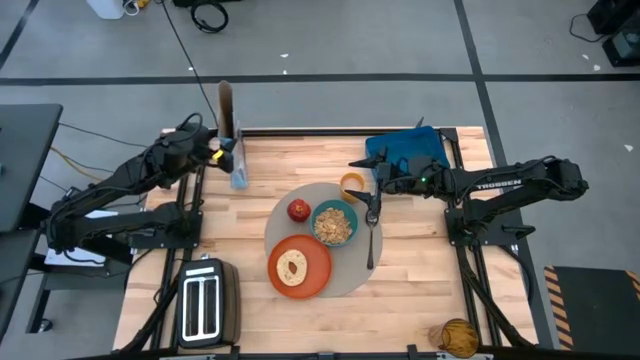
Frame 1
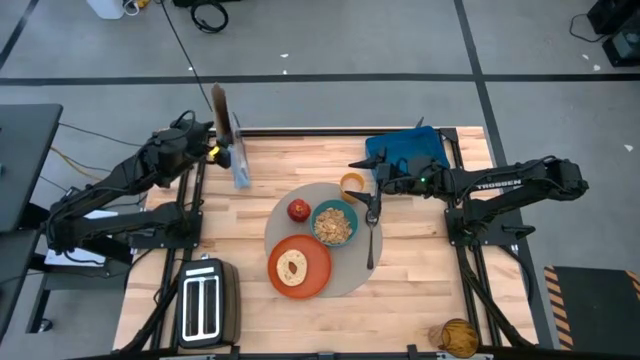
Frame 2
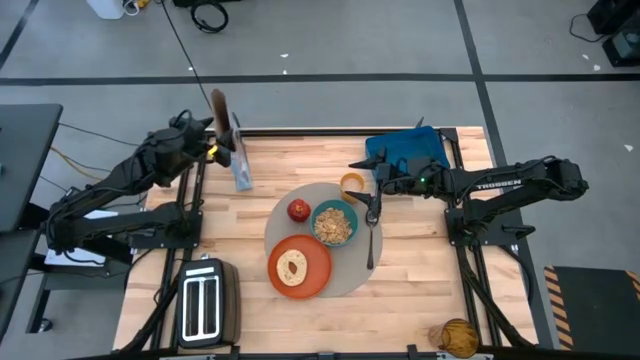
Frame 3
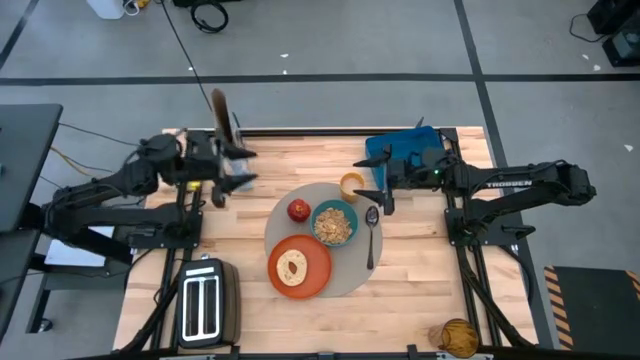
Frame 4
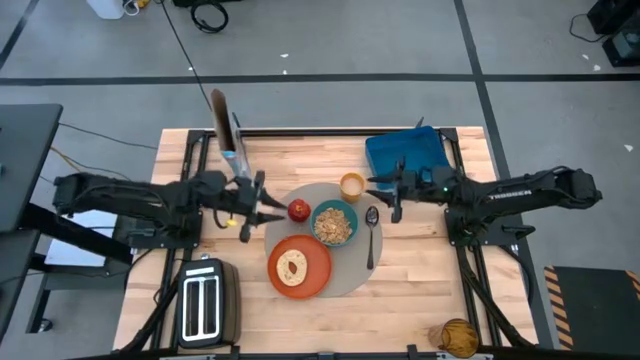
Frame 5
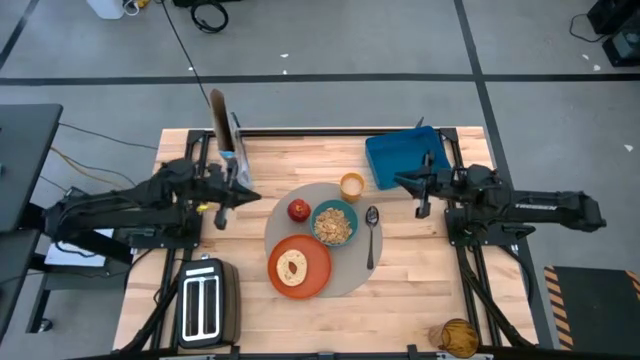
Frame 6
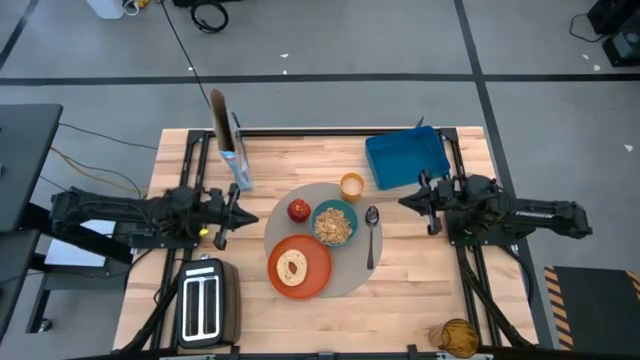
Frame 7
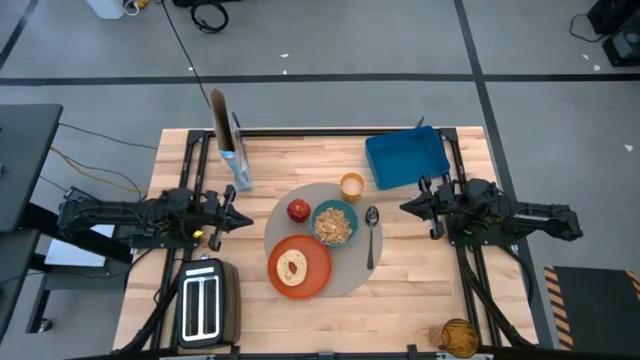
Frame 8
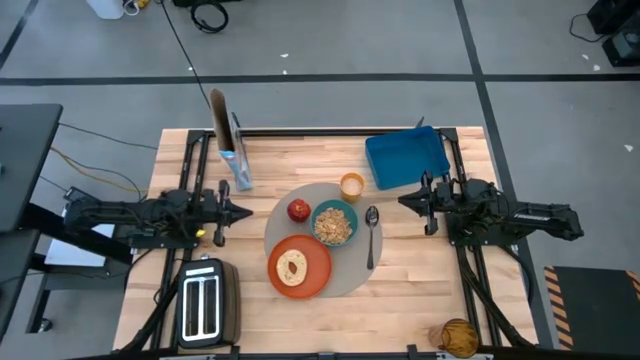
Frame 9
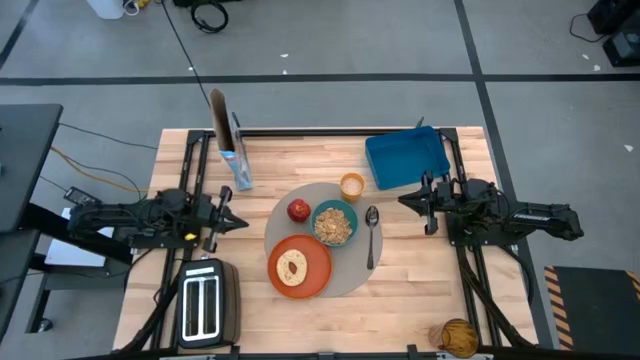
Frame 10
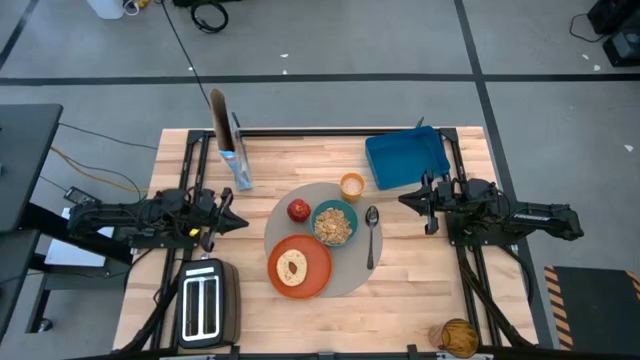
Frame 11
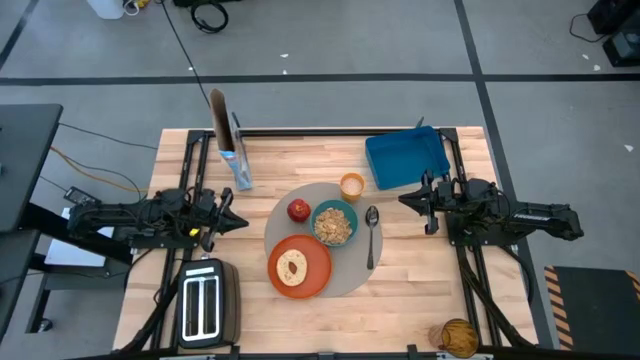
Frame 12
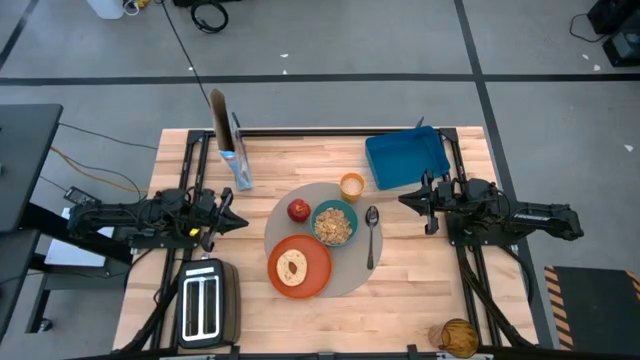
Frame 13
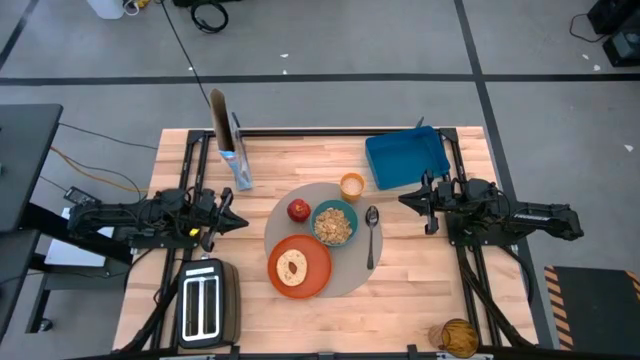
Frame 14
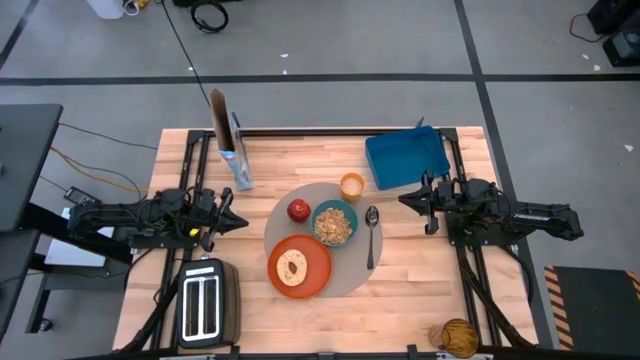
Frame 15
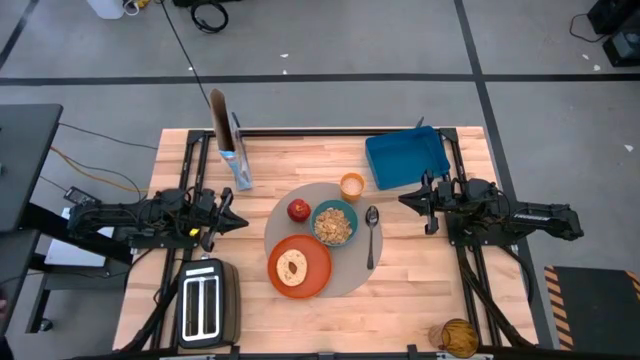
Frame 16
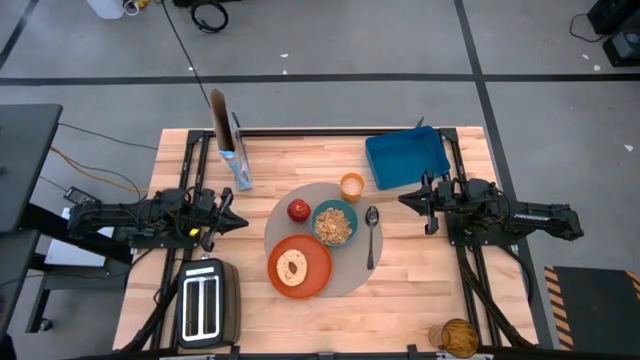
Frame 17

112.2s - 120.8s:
Task: Arrange a breakfast setting
Return to Home Position

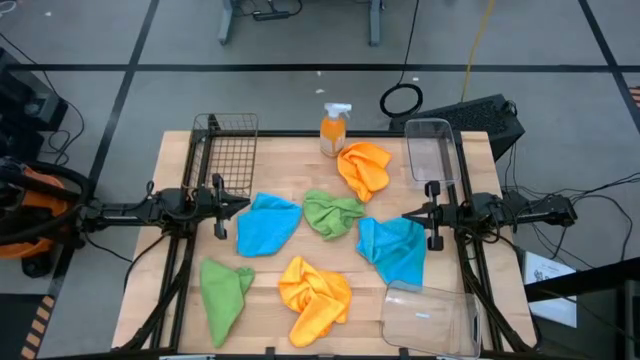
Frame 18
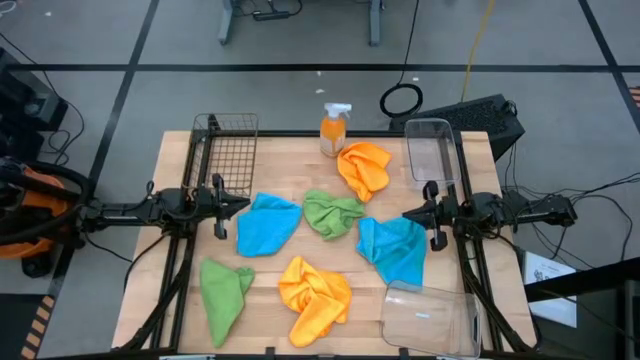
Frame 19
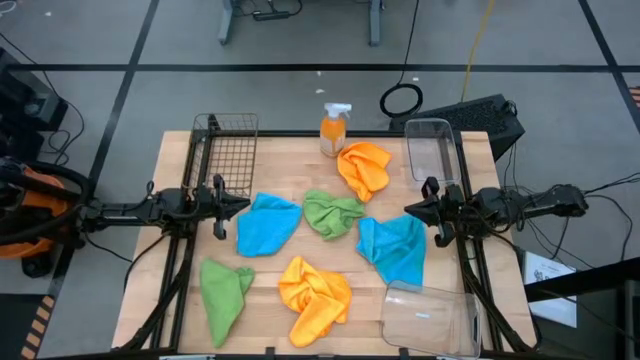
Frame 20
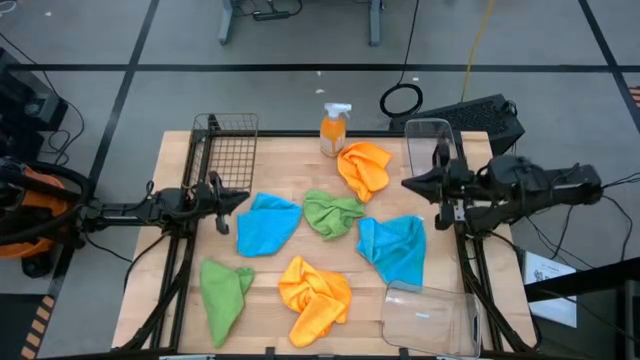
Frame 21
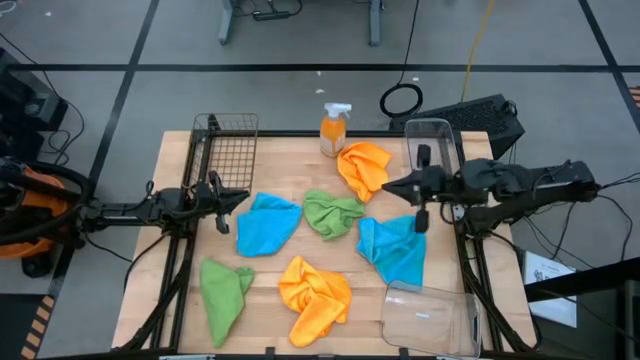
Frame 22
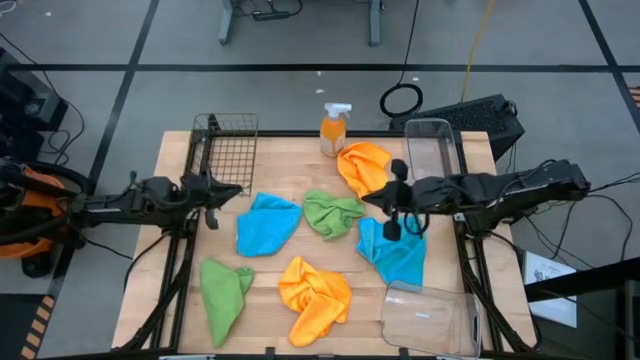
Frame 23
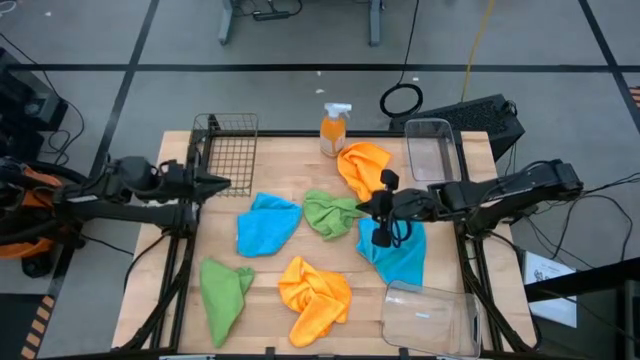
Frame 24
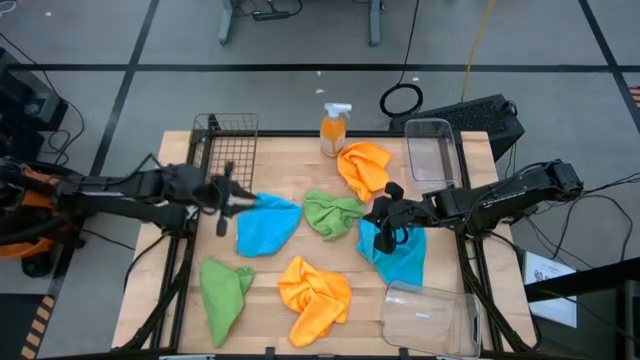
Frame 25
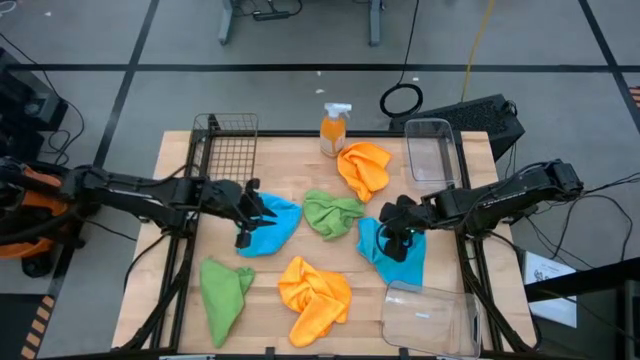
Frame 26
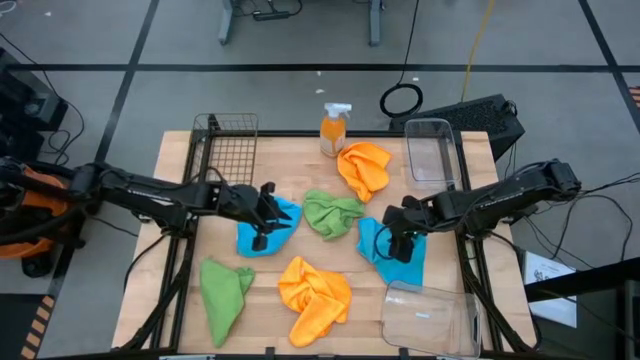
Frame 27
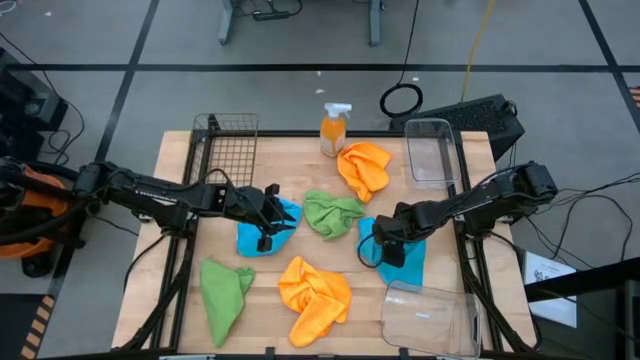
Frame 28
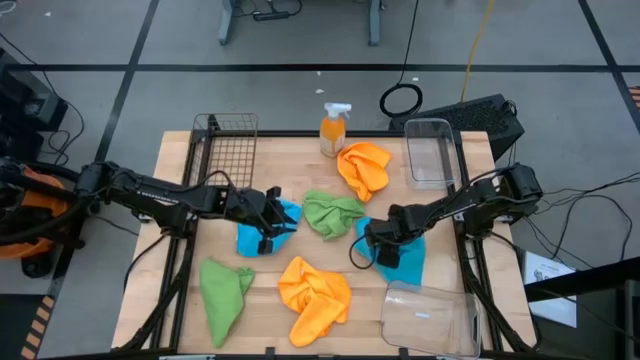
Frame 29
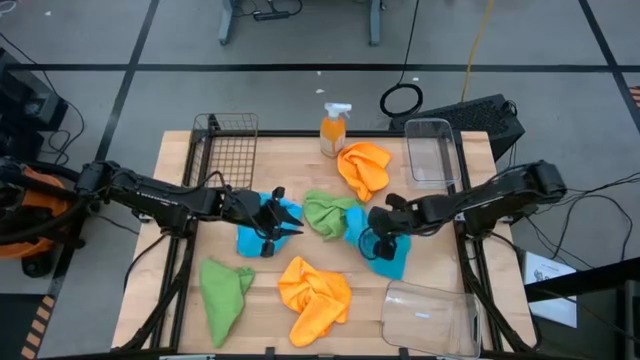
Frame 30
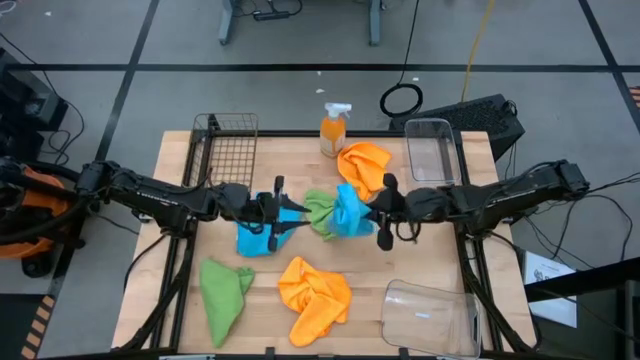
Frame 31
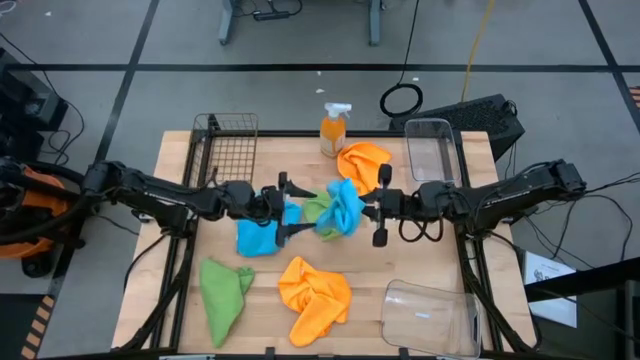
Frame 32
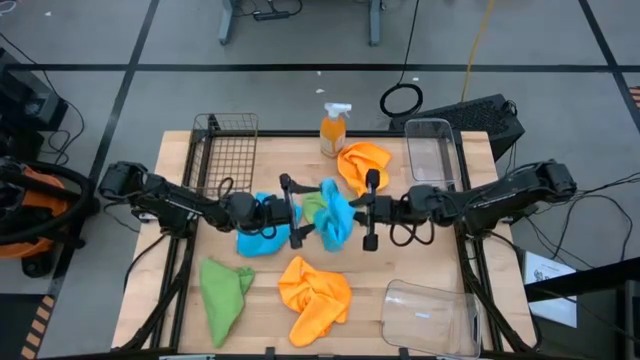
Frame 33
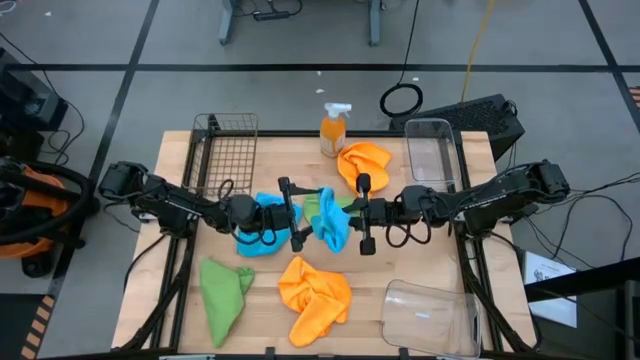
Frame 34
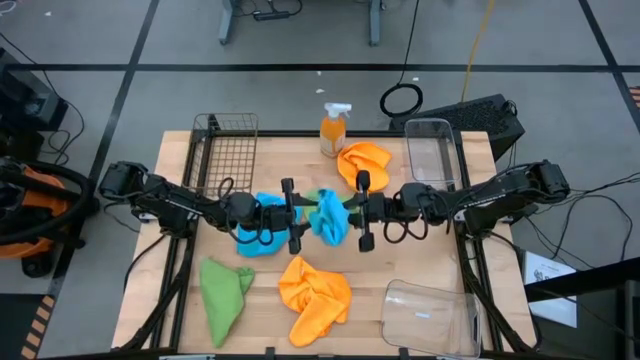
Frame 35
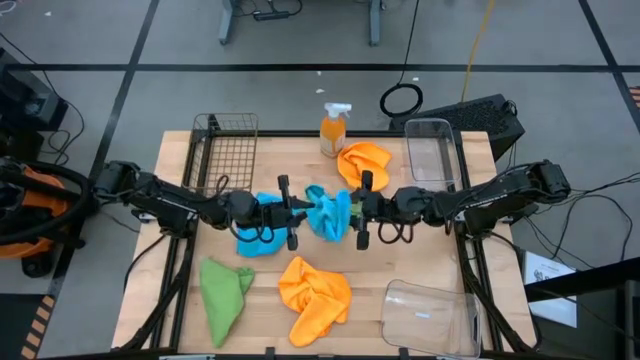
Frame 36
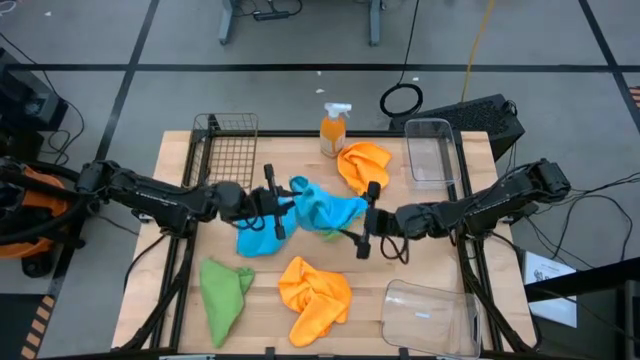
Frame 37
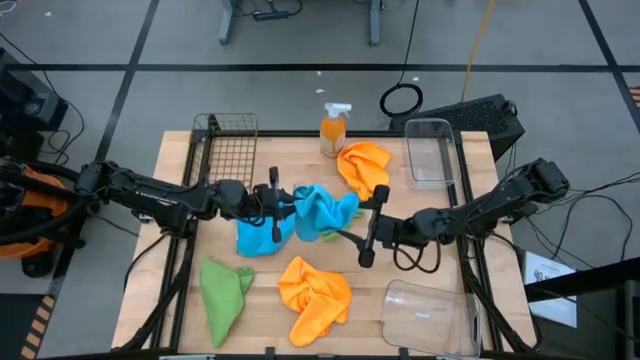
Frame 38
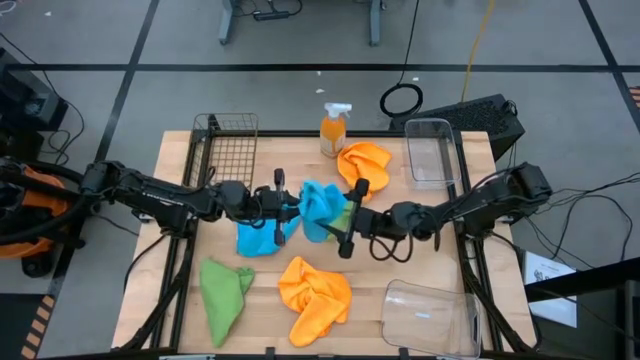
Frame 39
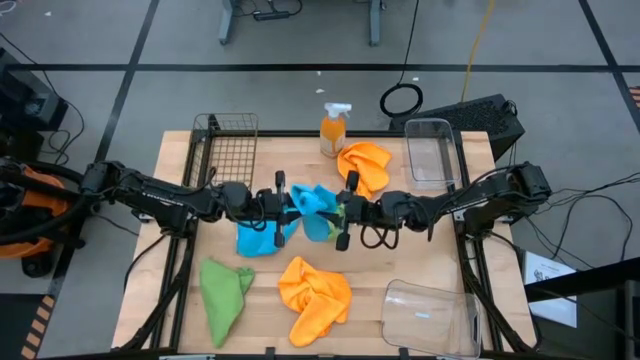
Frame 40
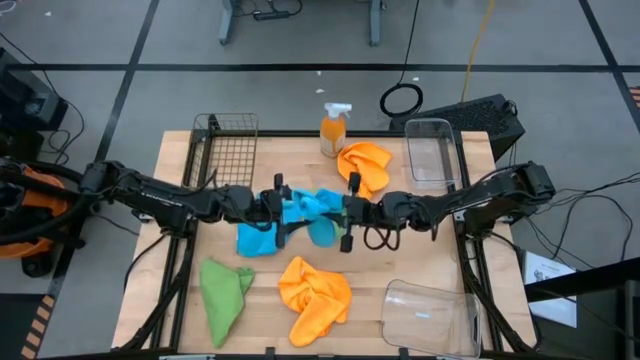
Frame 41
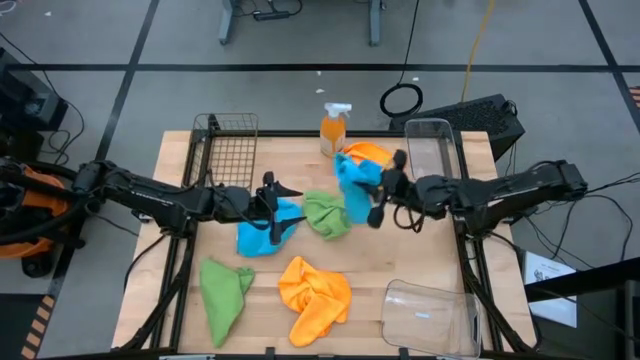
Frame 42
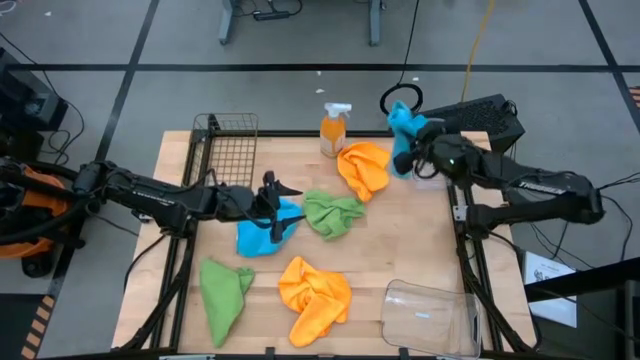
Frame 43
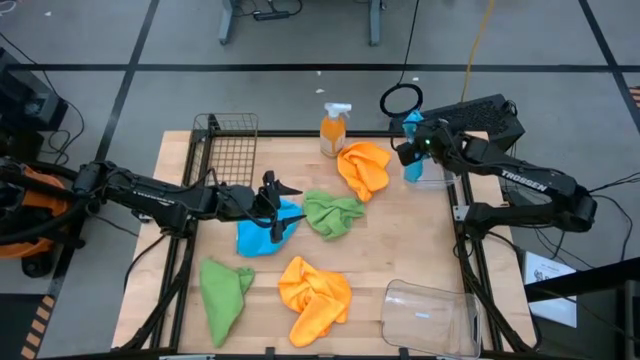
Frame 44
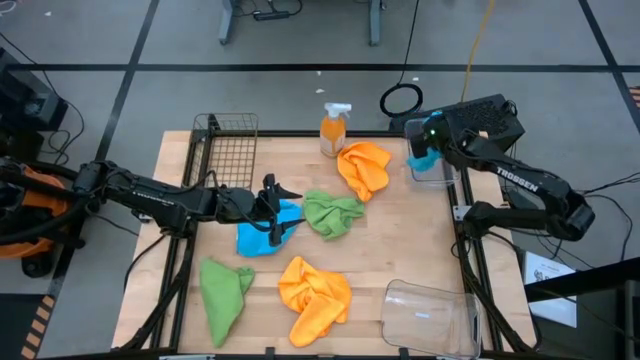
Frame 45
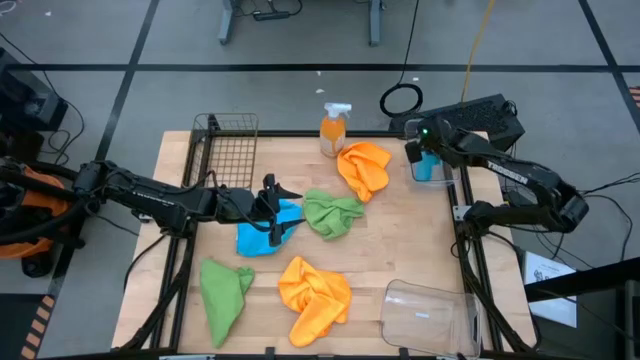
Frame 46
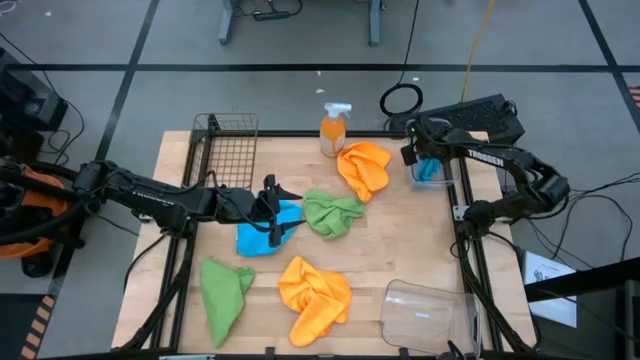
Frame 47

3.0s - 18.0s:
Task: Sort microfiber towel by color & place in baskets
Put the right blue microfiber towel into the top transparent bin
